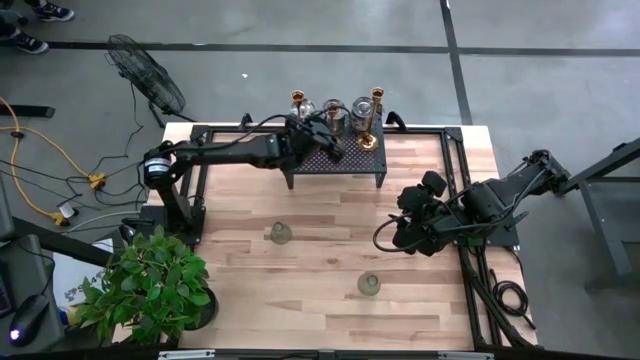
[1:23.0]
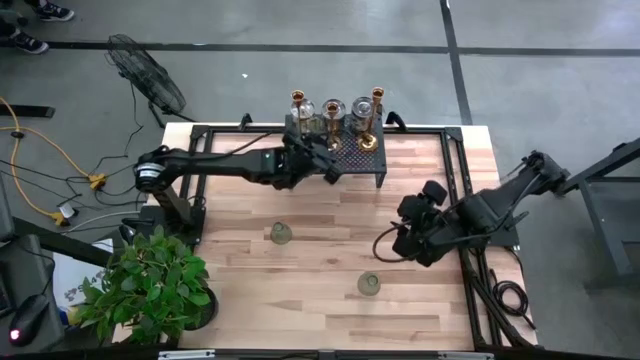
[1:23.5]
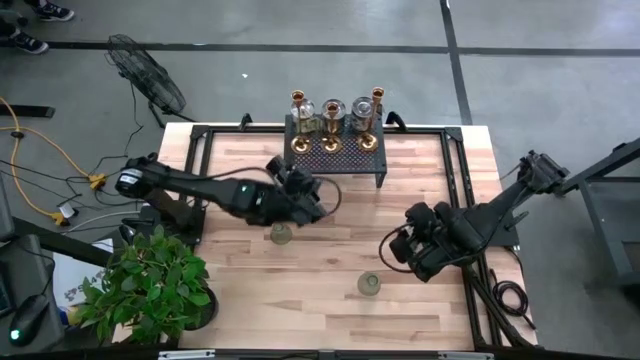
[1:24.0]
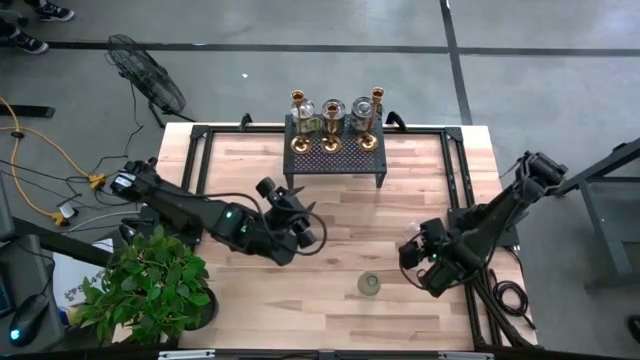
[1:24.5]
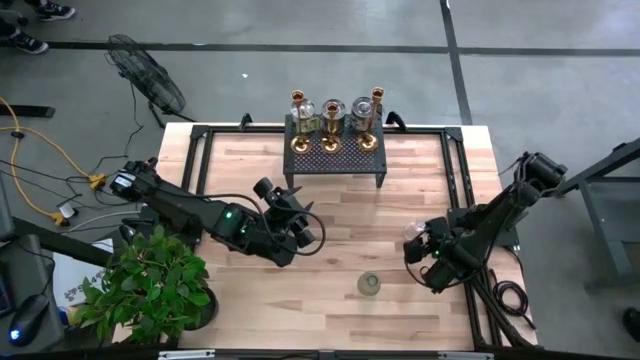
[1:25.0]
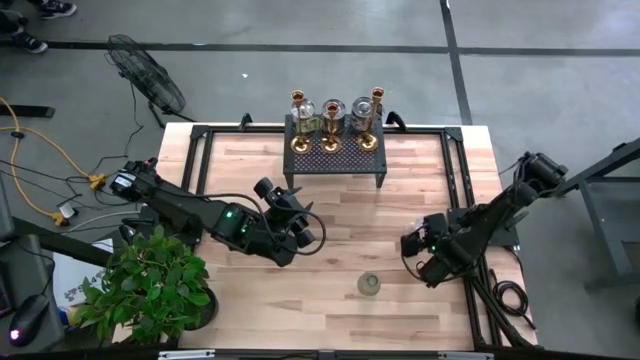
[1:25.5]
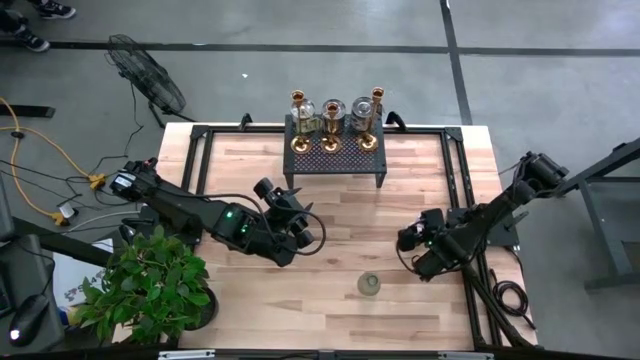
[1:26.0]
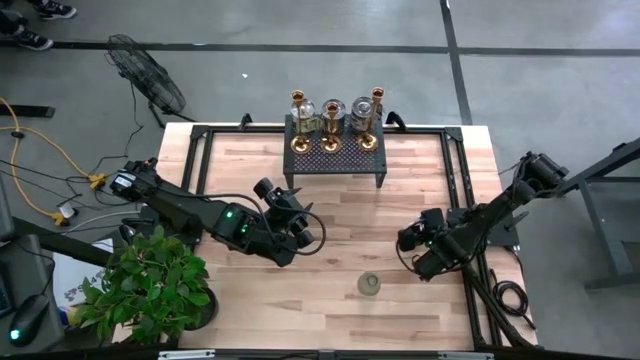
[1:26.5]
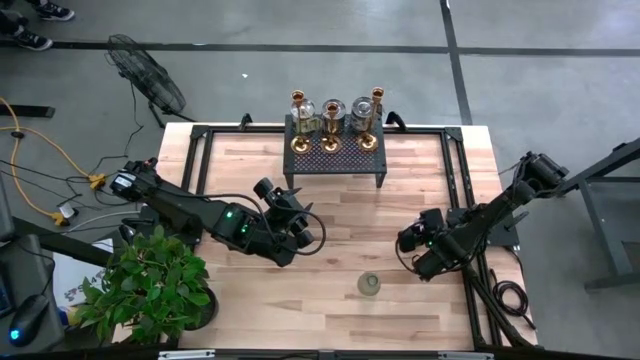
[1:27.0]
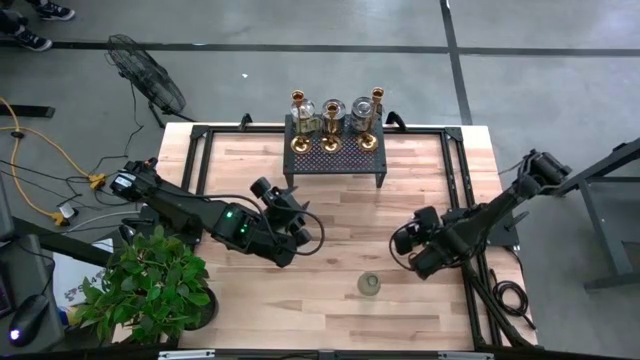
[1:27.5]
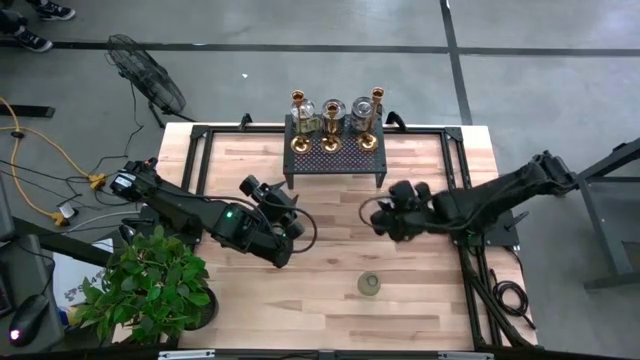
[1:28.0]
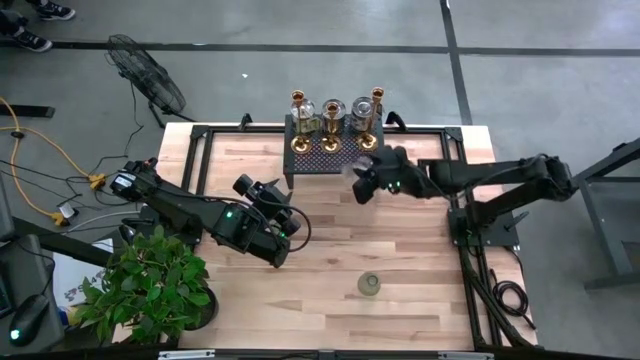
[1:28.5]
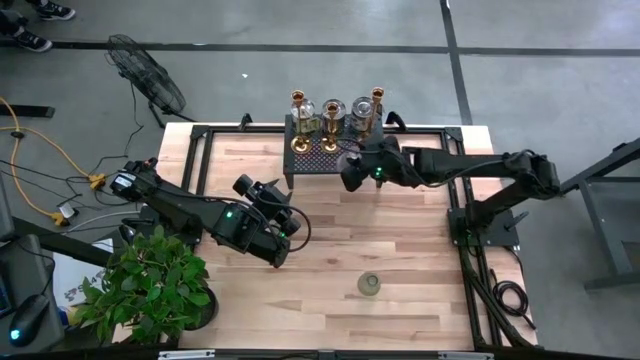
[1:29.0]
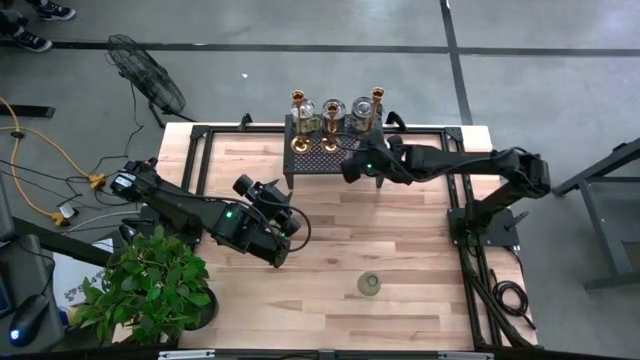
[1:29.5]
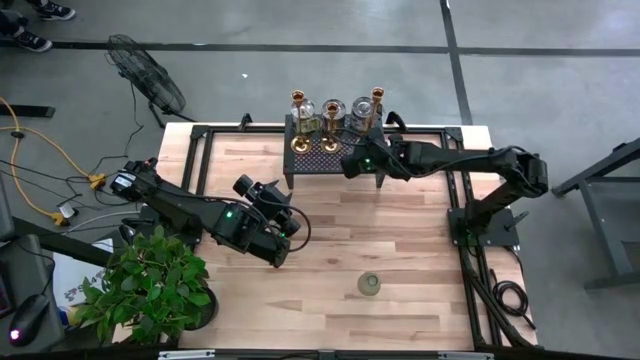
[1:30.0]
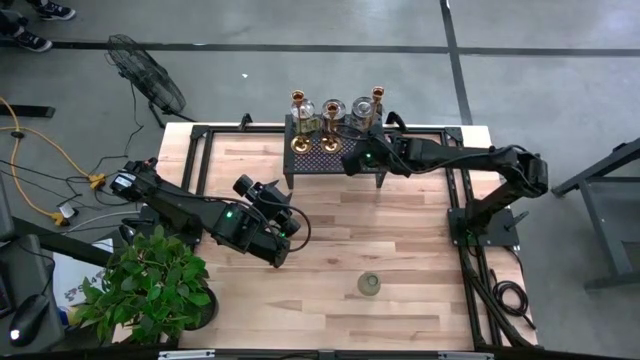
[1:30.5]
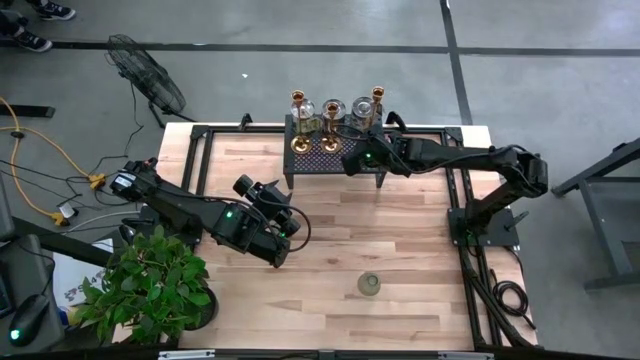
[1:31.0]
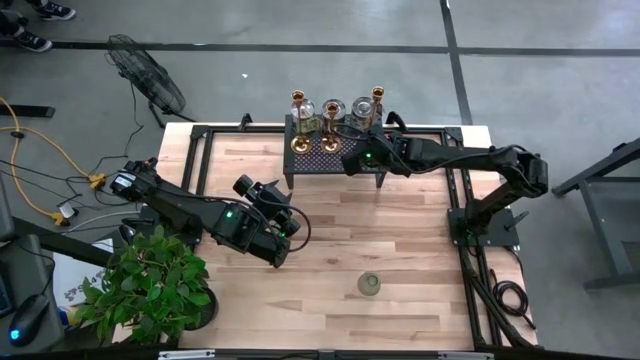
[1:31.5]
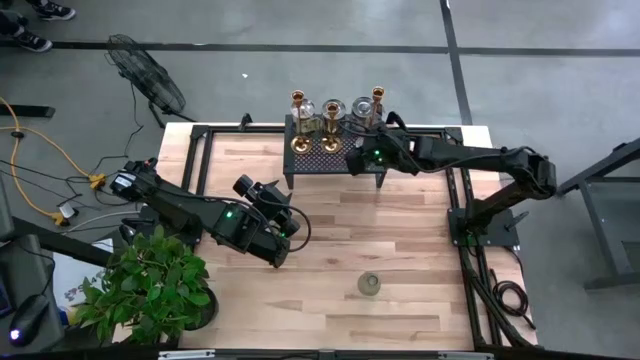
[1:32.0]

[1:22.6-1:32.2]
Task: Stock candles on shelf
Put the transparent candle holder on the shelf

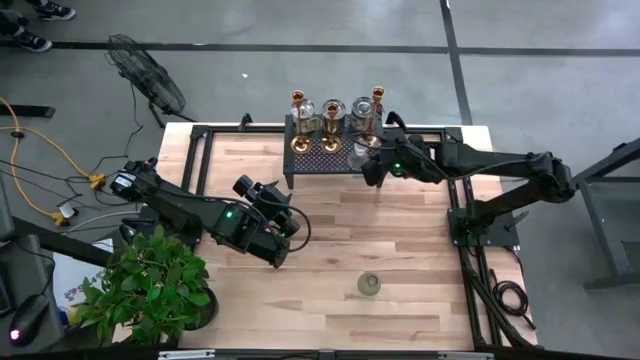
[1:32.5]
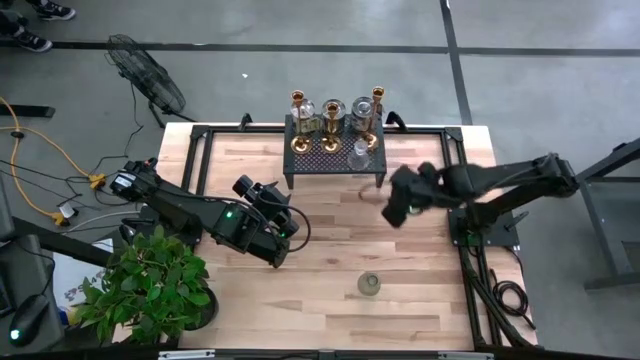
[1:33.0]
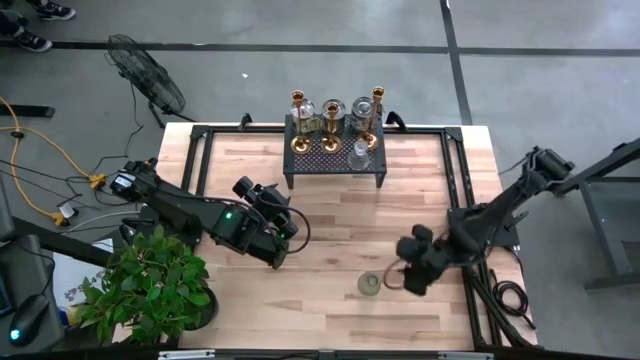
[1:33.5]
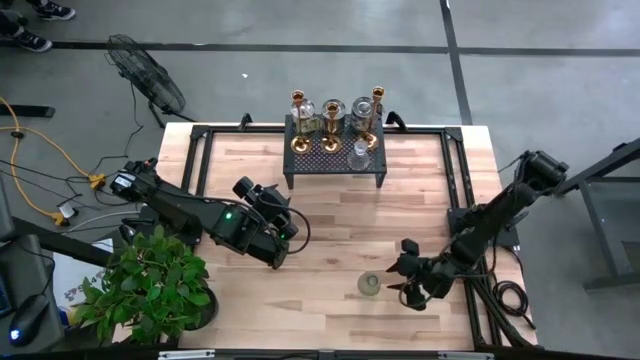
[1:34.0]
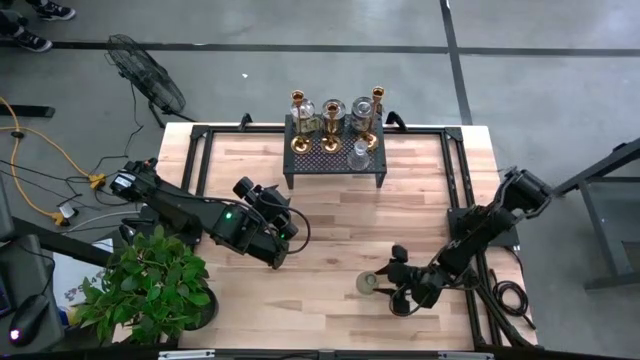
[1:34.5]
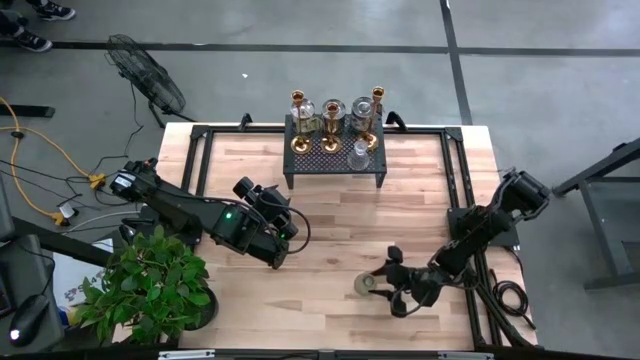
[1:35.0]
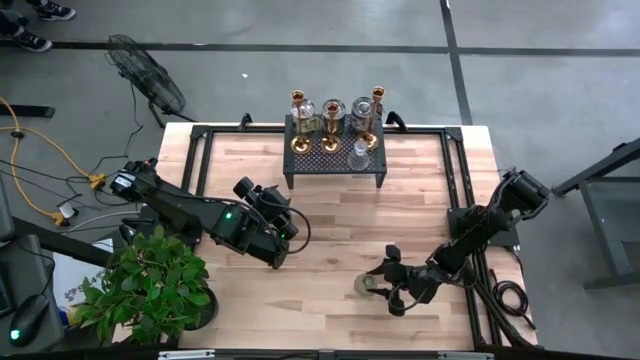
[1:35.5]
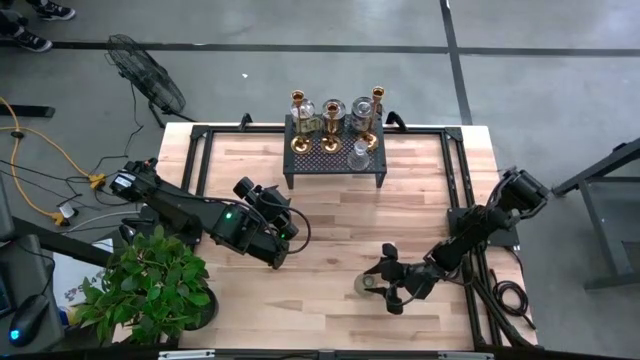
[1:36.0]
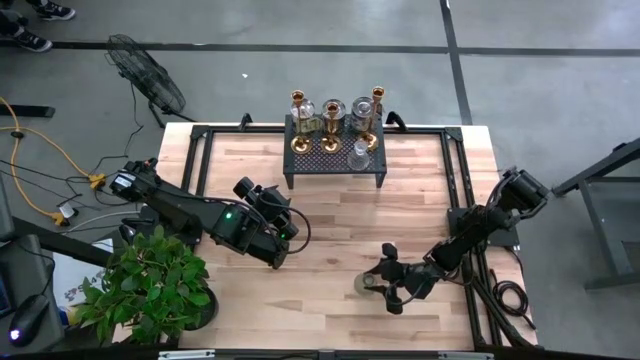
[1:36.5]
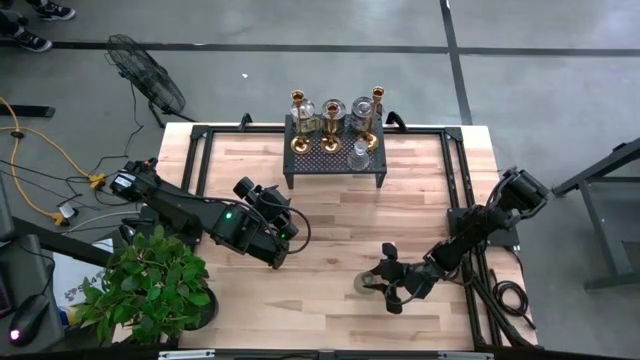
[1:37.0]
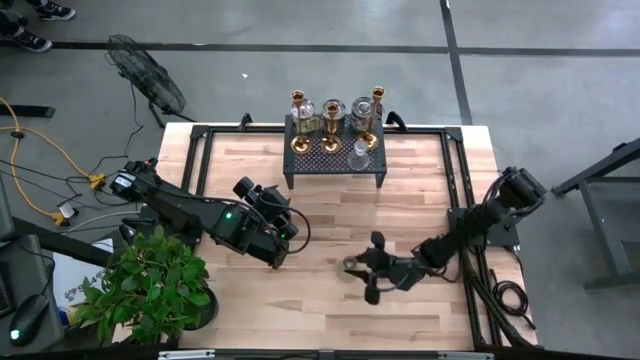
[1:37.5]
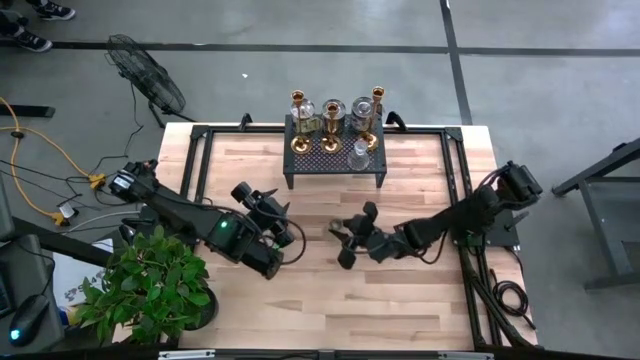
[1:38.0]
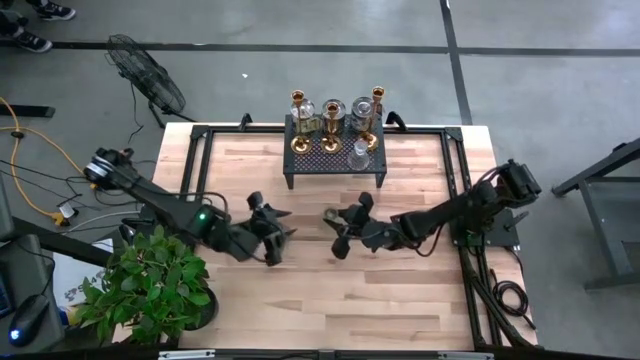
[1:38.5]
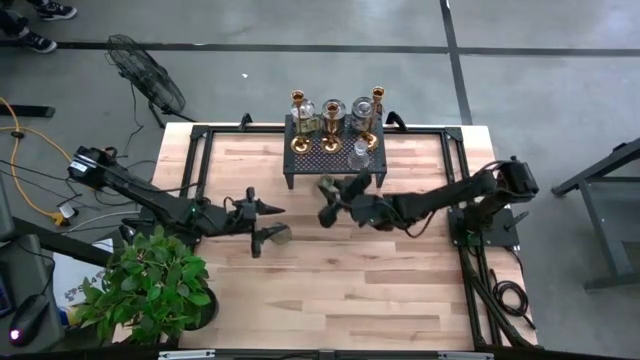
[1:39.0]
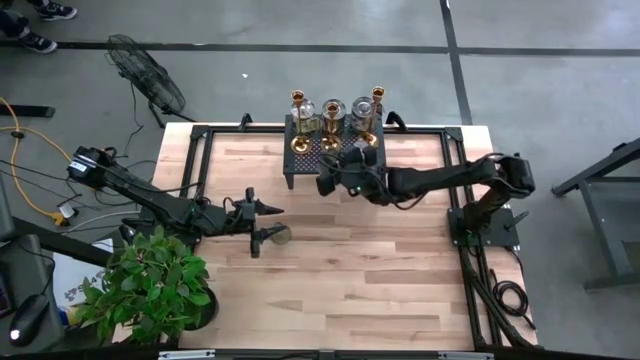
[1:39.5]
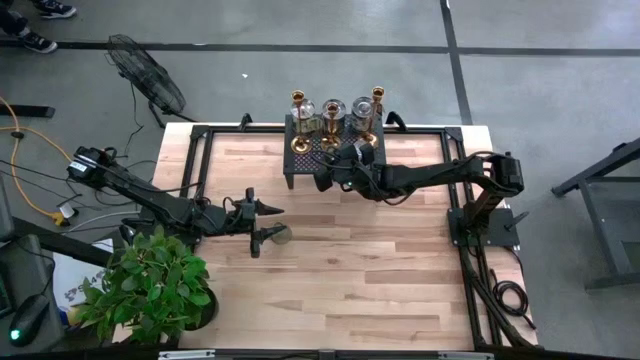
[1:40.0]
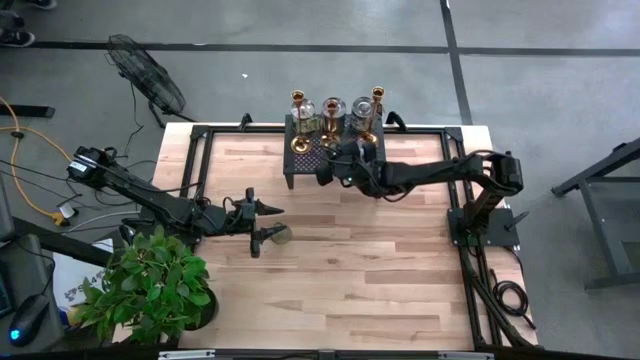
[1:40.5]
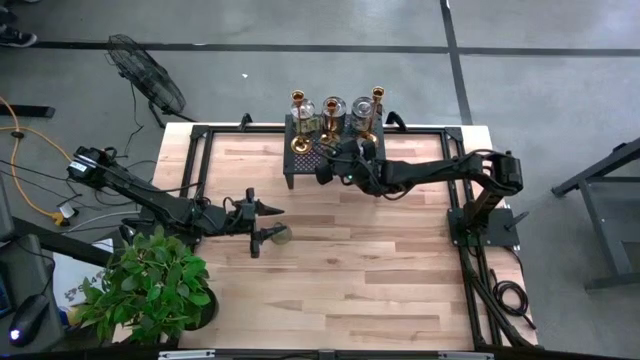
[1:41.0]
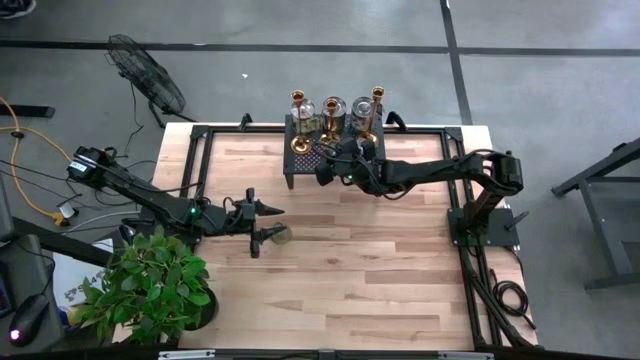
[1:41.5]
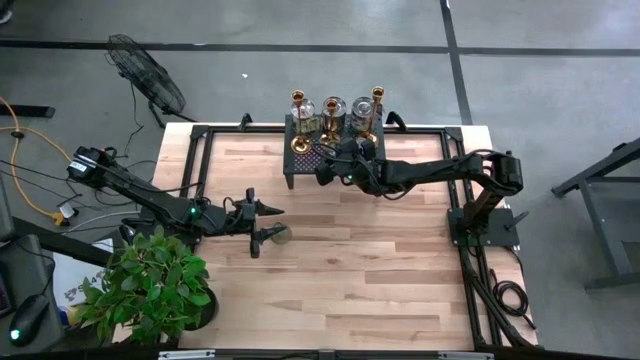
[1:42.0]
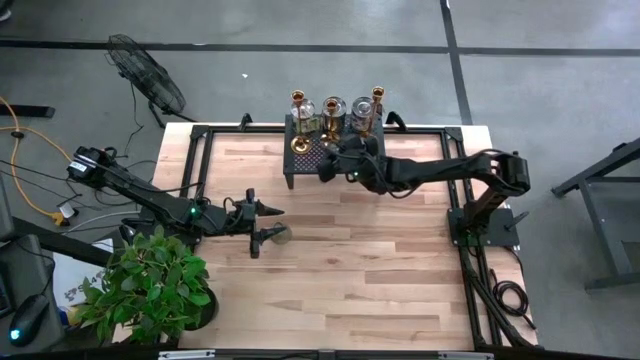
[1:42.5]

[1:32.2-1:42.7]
Put the bottom gray candle holder on the shelf

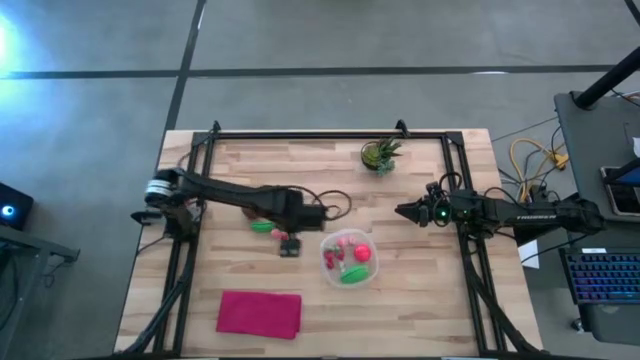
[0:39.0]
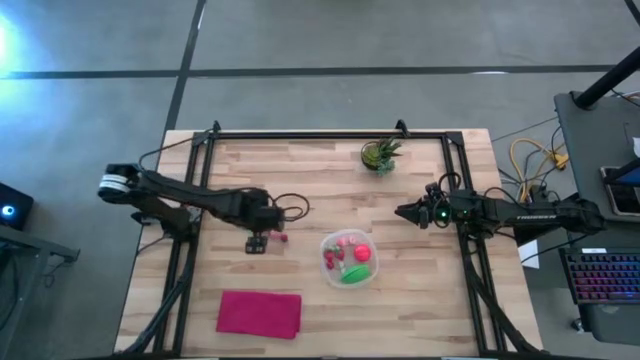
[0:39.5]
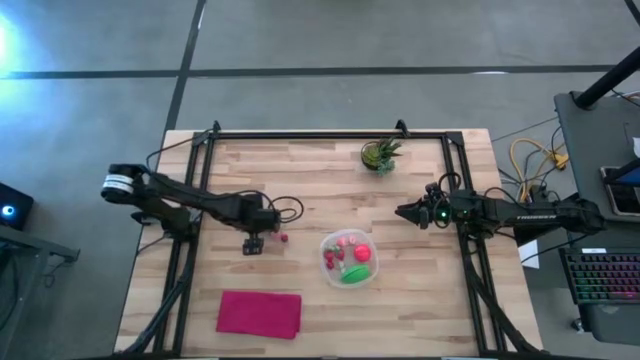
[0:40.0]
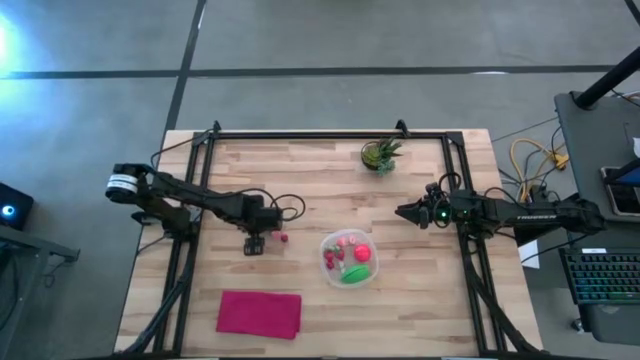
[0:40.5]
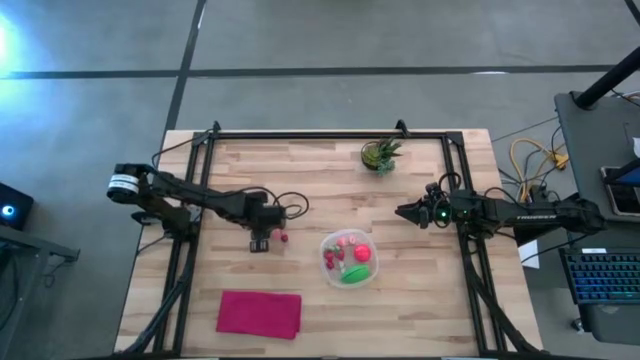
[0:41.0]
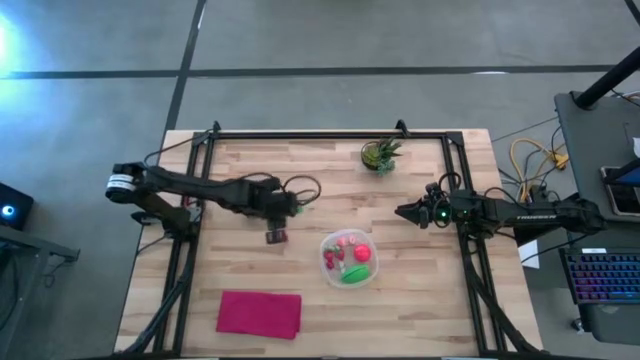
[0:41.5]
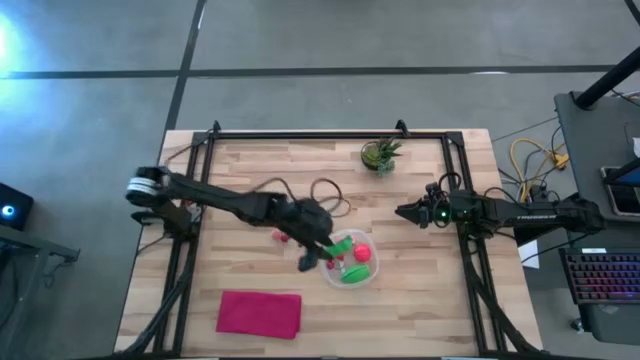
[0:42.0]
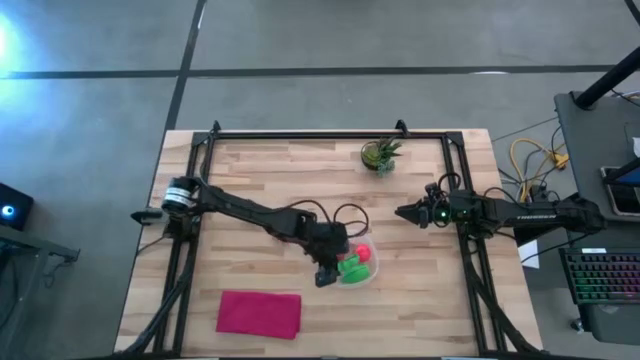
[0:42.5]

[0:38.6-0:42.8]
Task: Pick and placing Produce into tupperware
Put the green pea into the container
